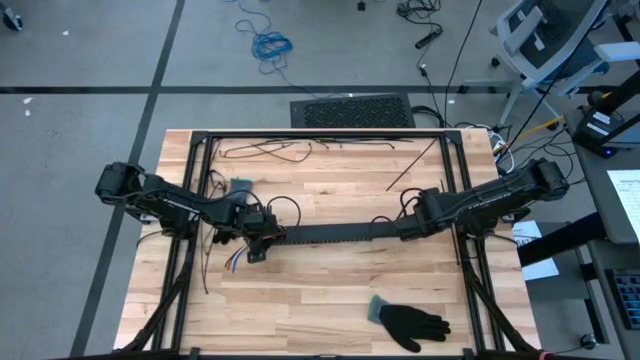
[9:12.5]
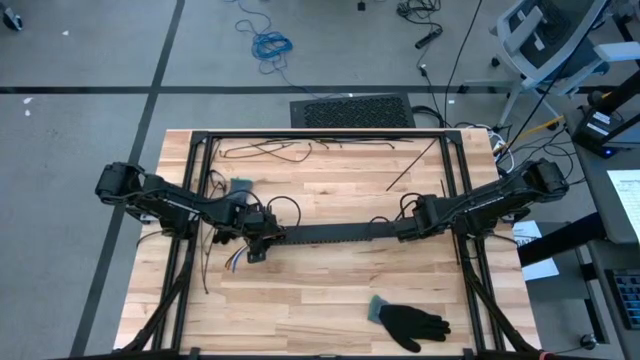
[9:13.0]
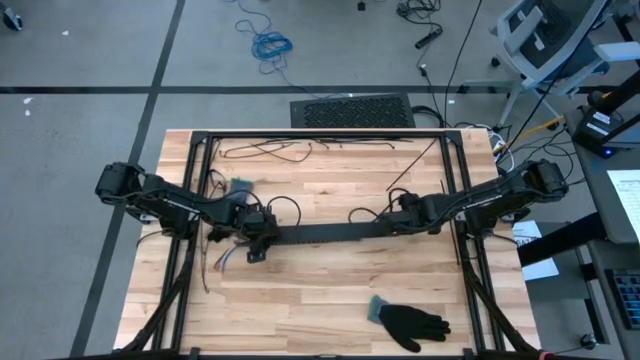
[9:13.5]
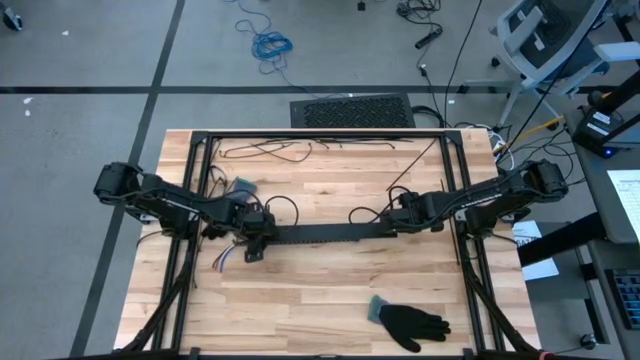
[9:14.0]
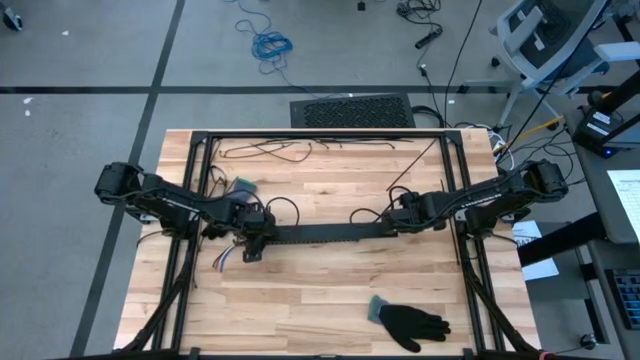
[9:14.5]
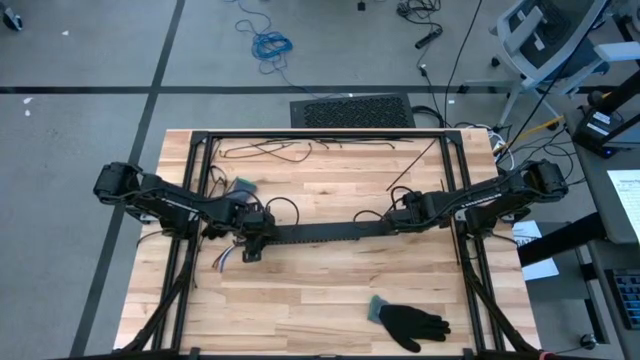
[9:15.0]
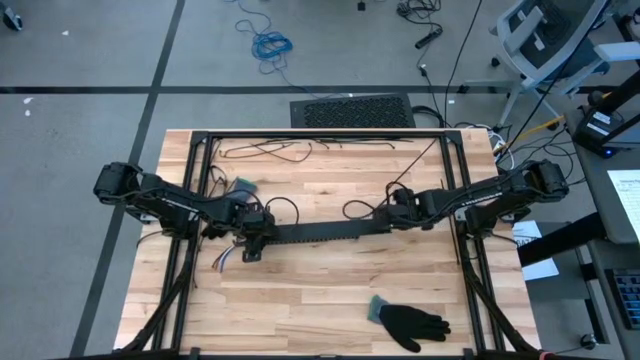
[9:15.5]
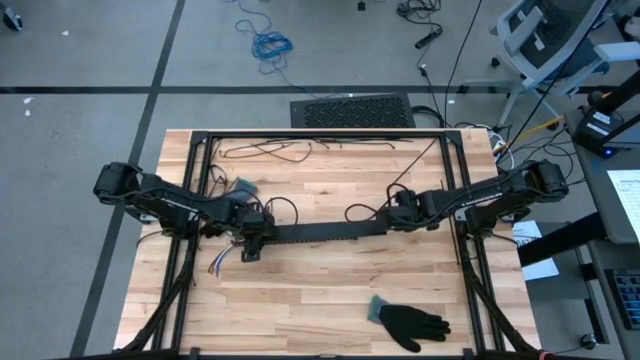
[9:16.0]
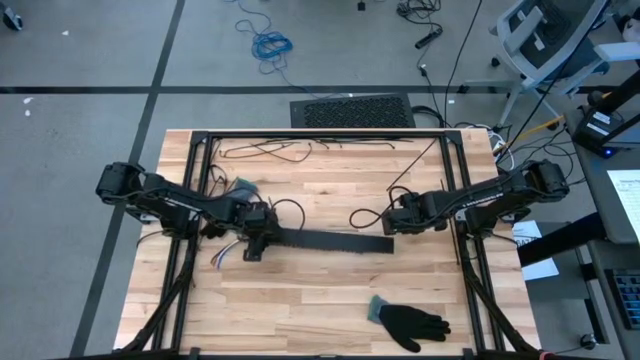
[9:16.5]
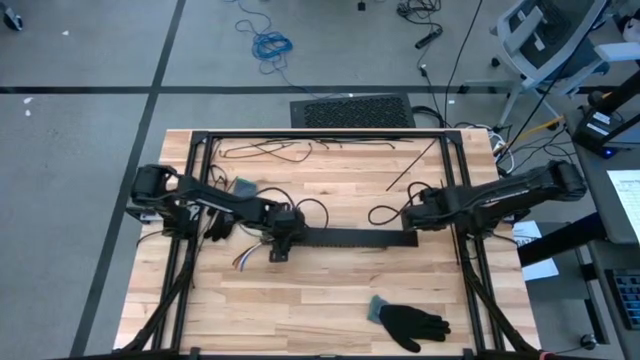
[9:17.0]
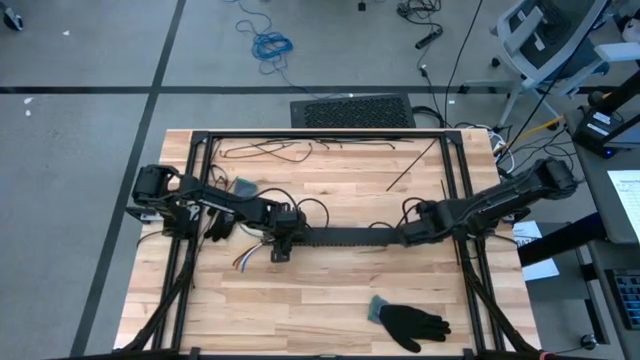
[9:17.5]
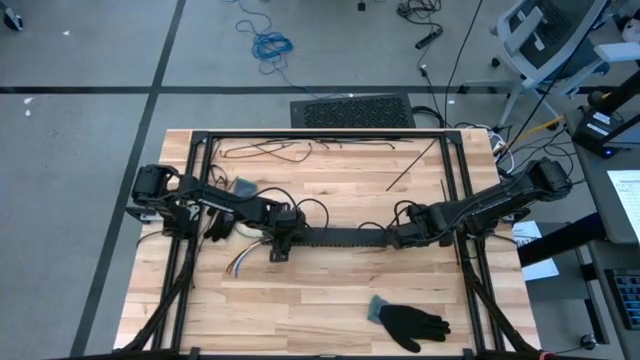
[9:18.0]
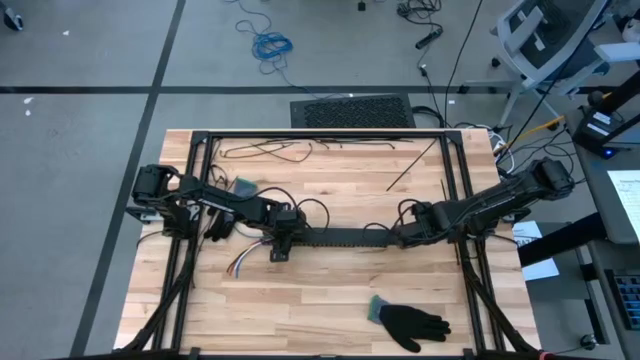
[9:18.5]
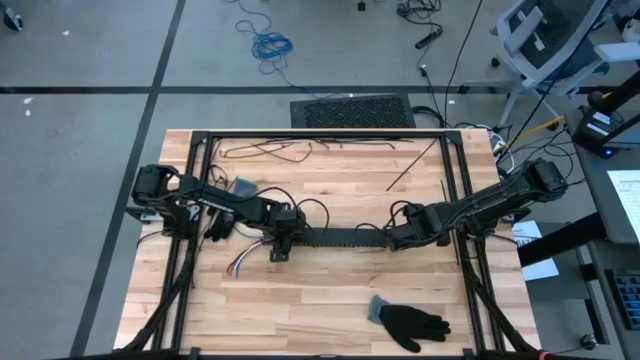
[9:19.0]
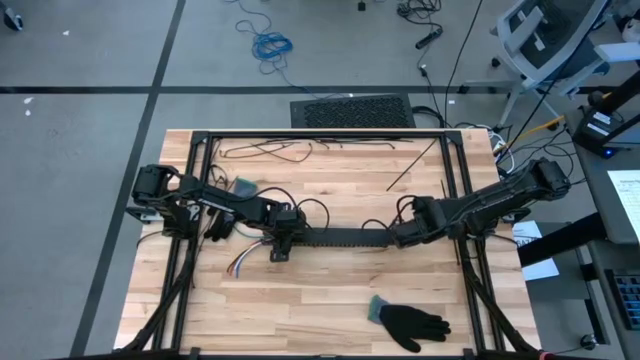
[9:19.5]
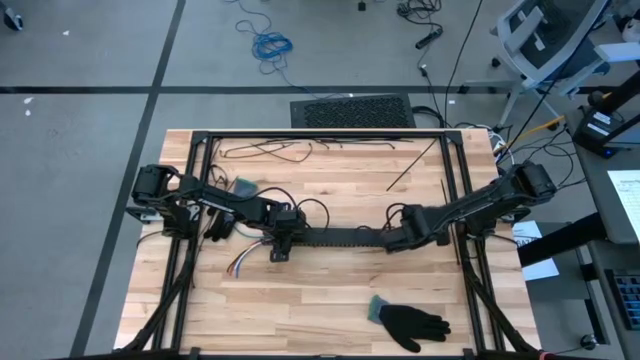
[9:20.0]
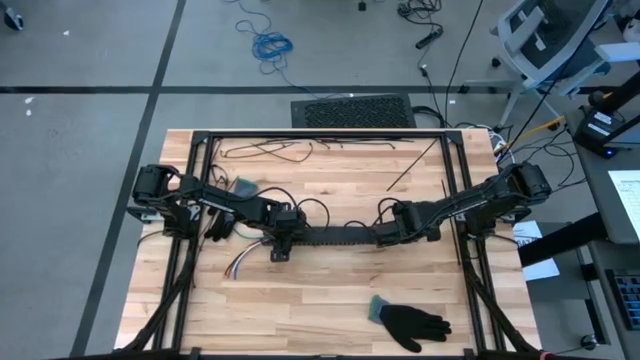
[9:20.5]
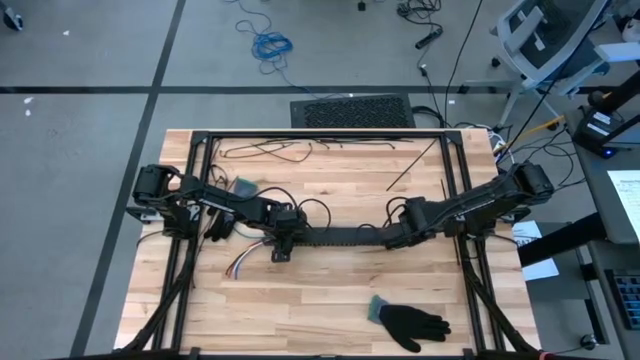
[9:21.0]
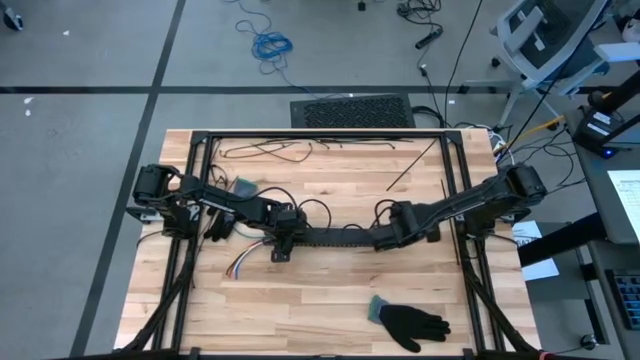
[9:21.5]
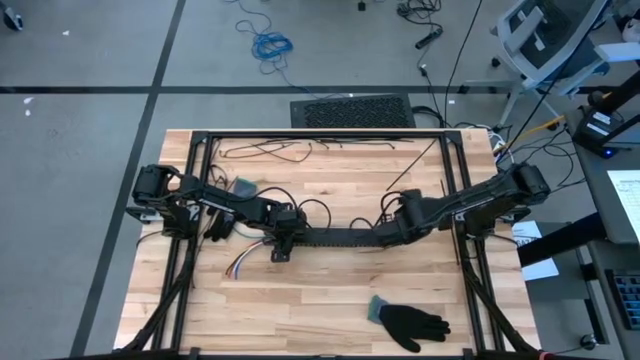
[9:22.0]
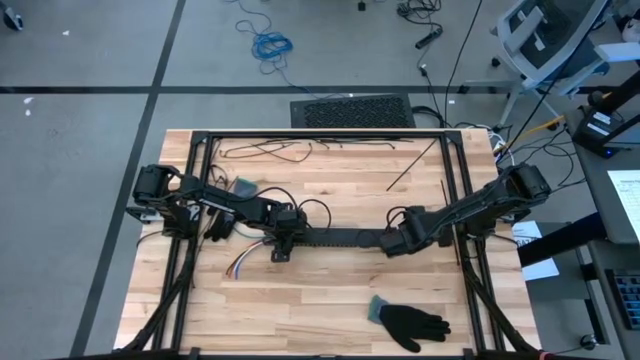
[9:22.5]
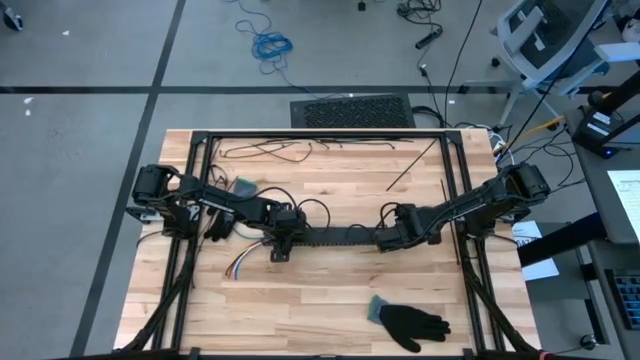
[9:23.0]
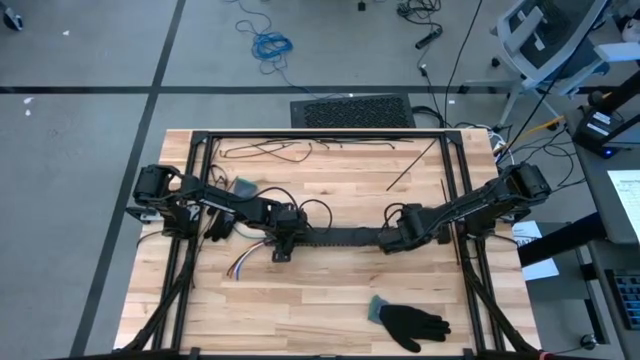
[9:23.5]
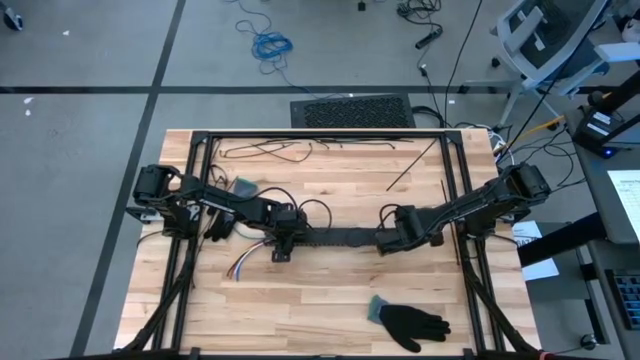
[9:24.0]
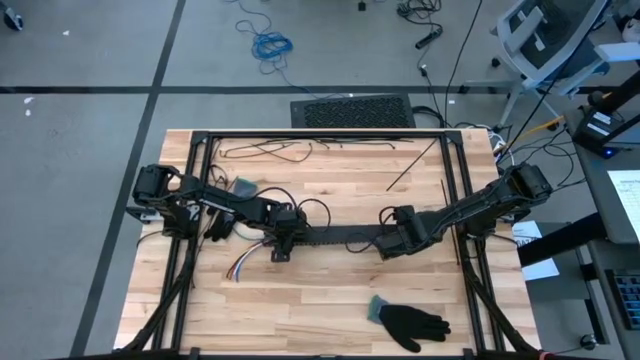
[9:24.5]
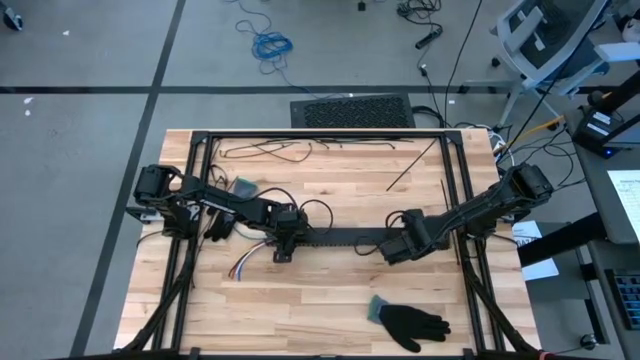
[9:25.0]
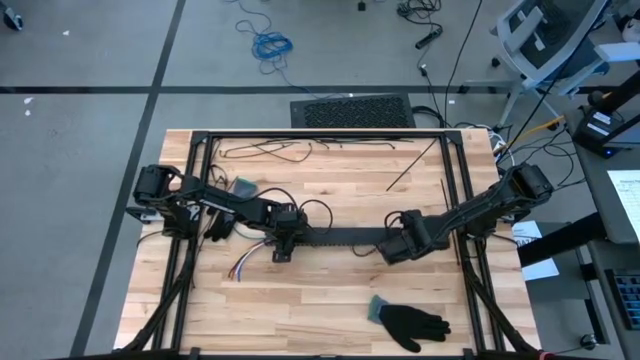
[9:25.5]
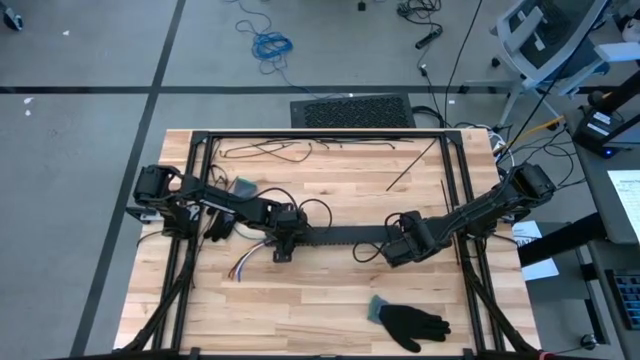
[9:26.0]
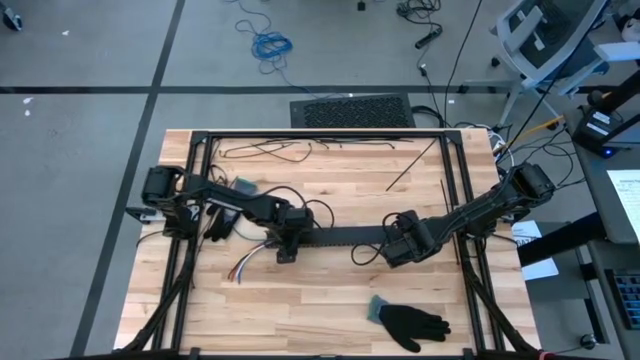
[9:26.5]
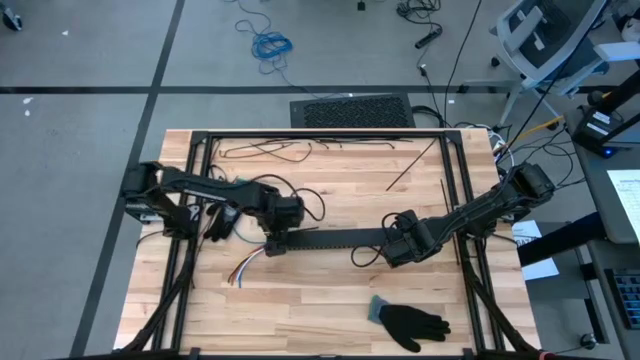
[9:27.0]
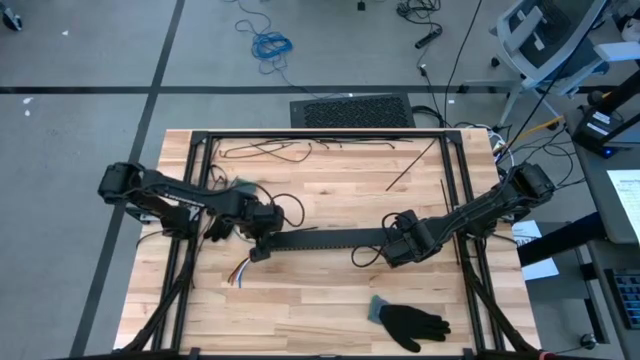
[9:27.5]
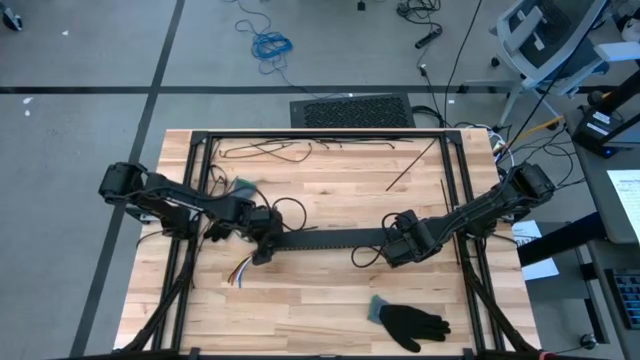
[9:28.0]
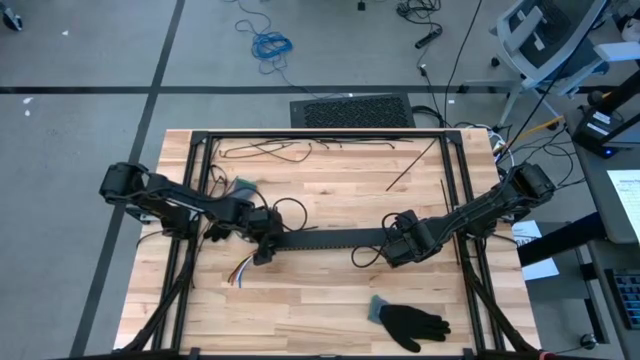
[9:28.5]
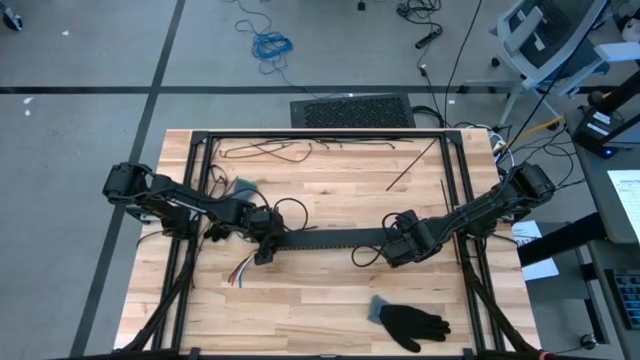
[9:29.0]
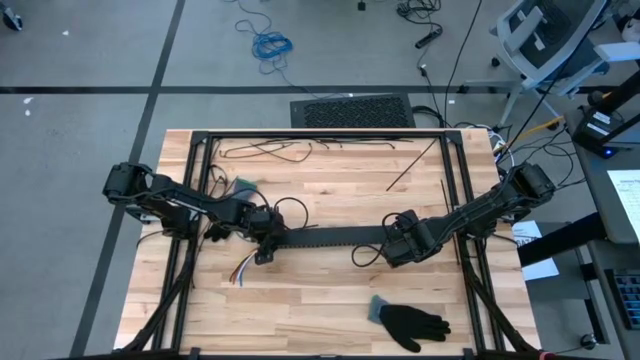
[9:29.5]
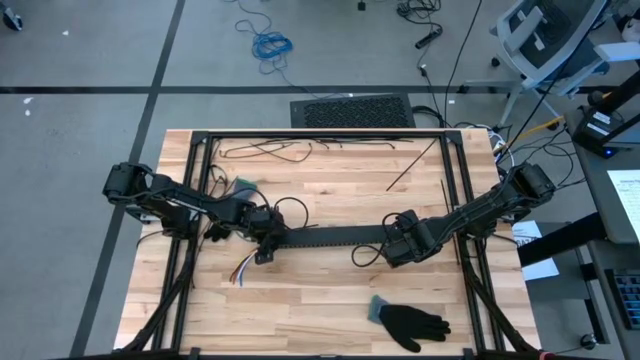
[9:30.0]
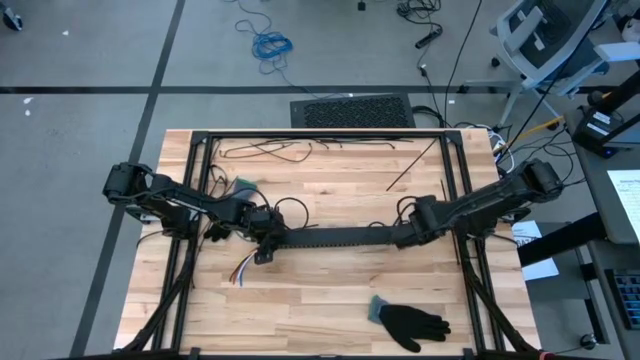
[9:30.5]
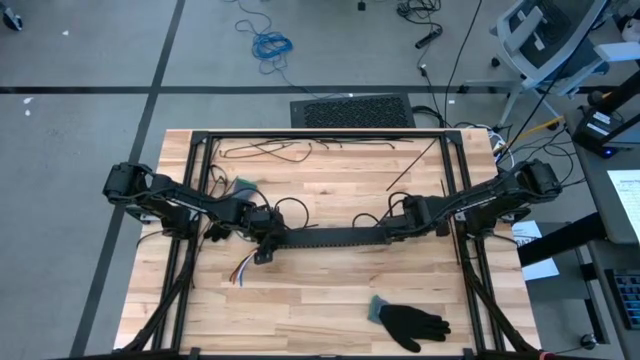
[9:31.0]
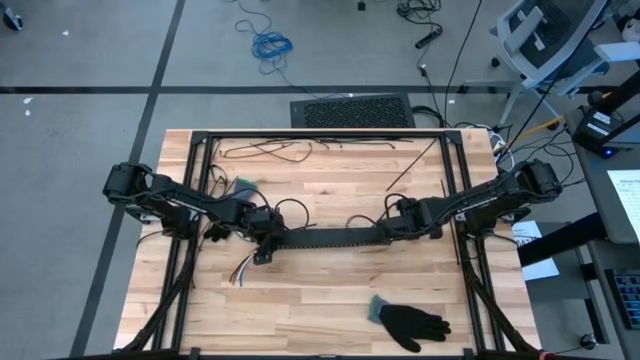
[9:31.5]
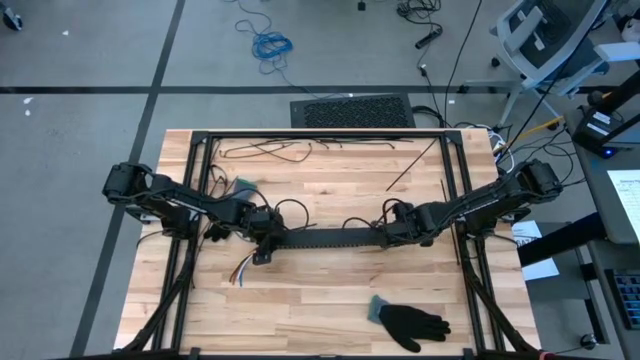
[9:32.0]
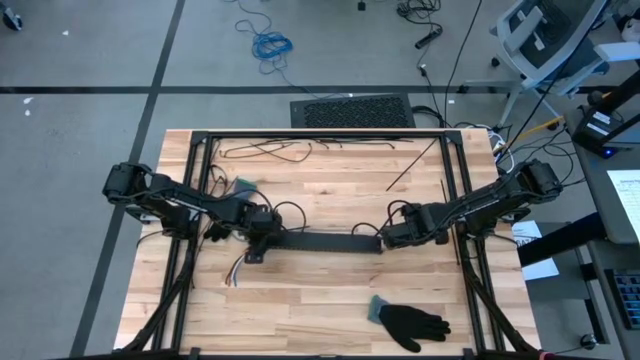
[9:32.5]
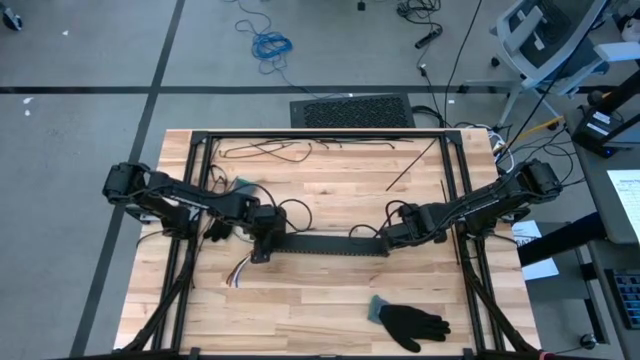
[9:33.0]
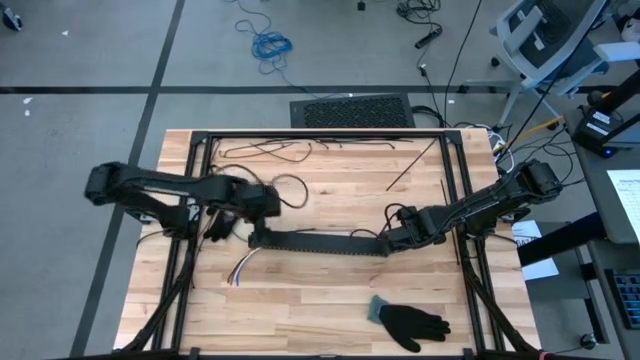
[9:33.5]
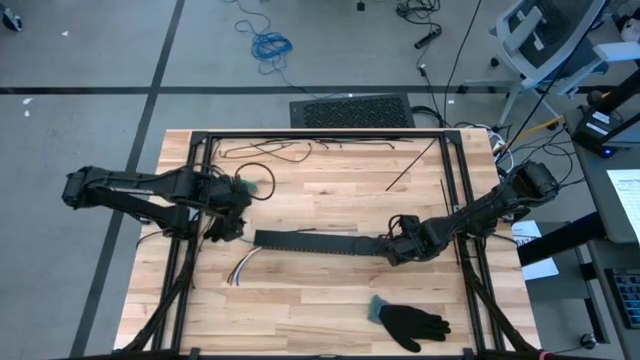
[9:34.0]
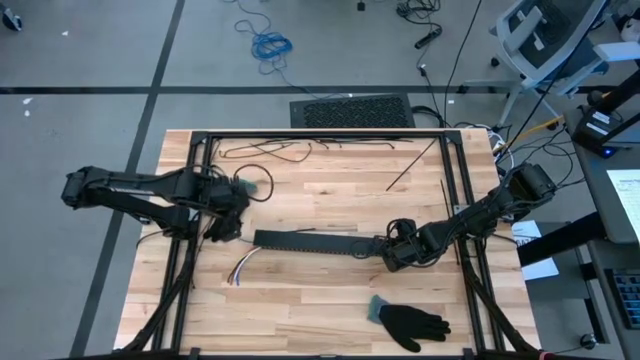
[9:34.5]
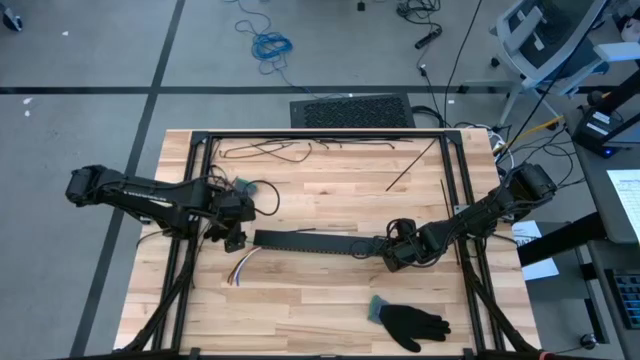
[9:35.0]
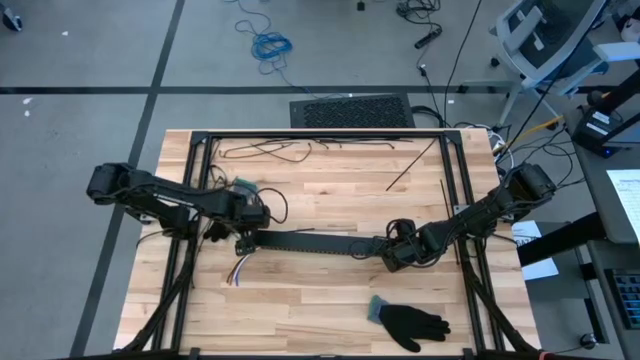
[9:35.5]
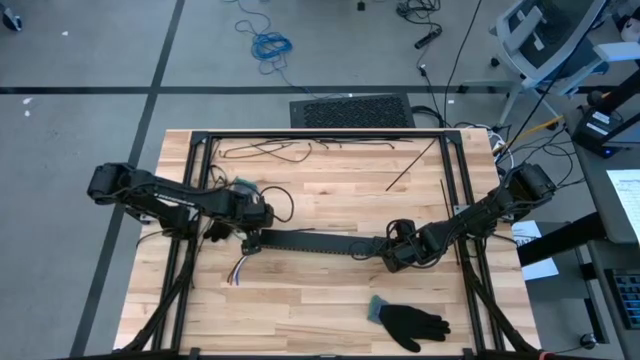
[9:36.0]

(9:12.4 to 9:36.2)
Task: Ziptie cables
Close the cable duct with the cable duct cover
